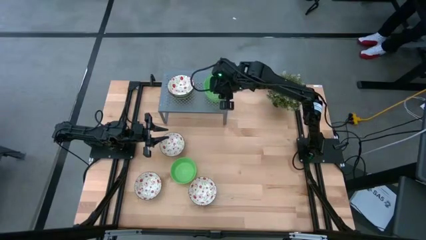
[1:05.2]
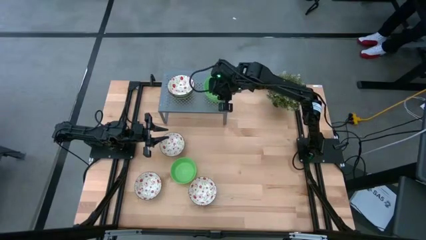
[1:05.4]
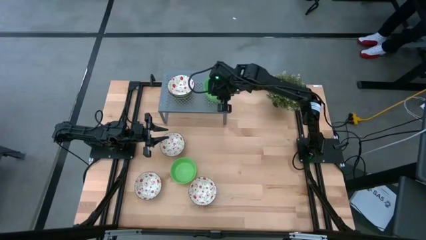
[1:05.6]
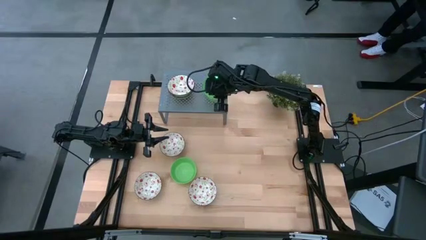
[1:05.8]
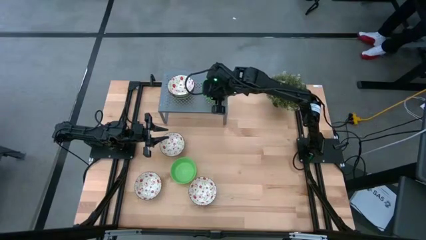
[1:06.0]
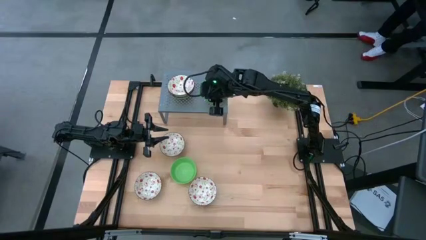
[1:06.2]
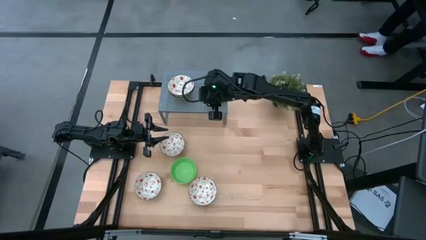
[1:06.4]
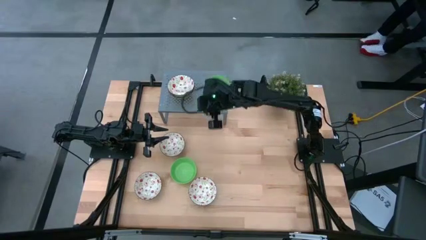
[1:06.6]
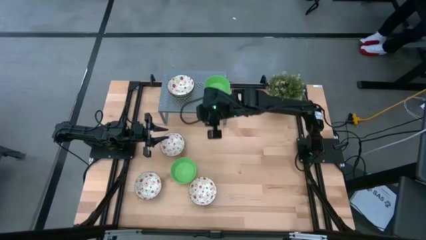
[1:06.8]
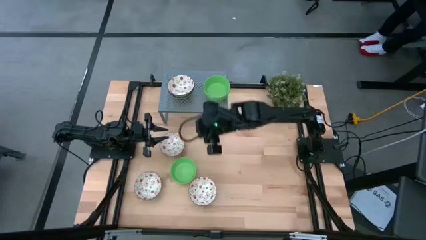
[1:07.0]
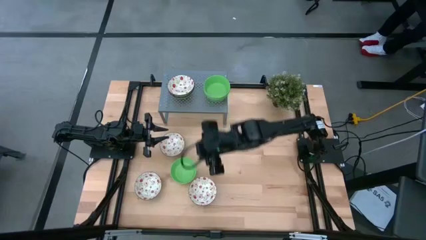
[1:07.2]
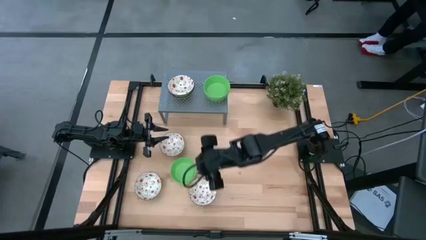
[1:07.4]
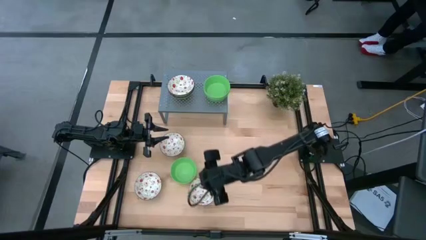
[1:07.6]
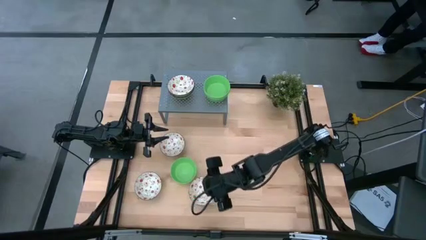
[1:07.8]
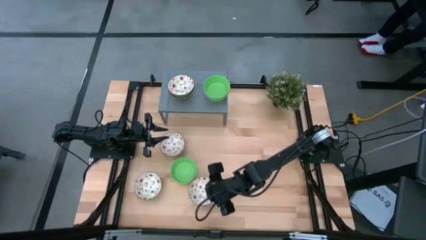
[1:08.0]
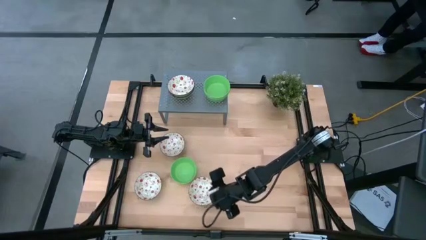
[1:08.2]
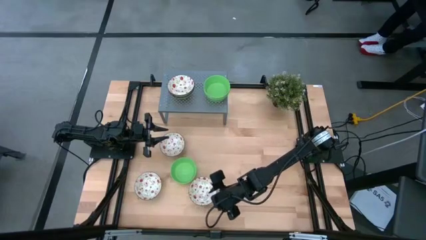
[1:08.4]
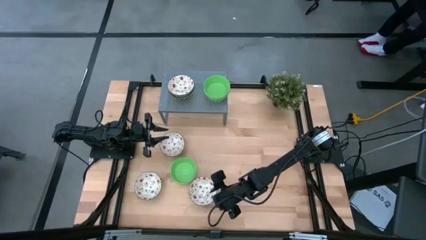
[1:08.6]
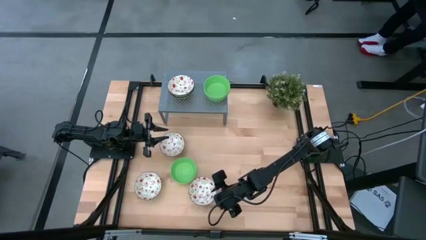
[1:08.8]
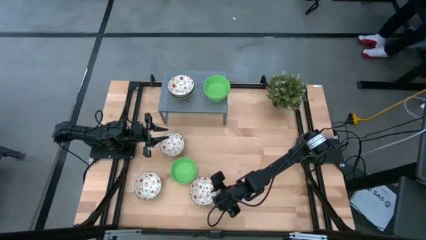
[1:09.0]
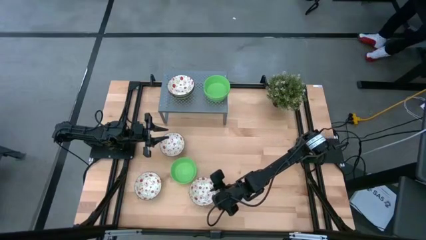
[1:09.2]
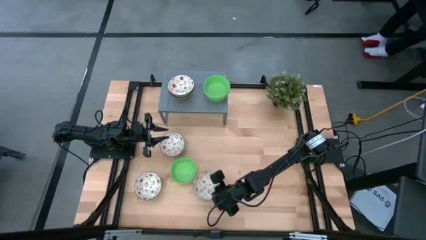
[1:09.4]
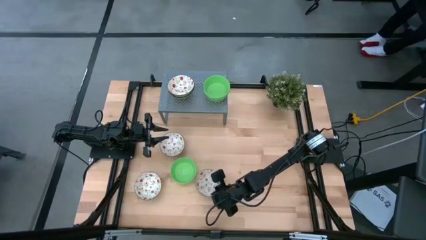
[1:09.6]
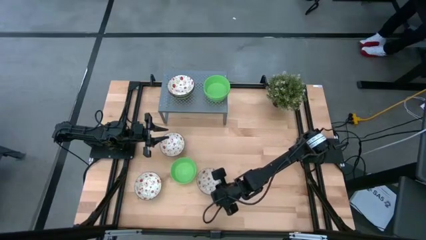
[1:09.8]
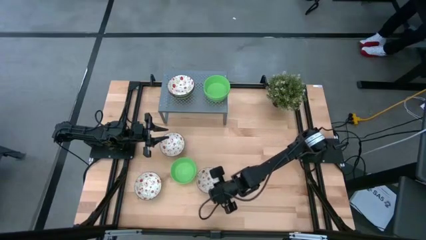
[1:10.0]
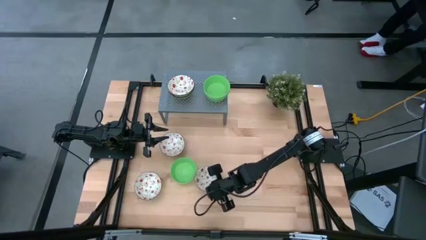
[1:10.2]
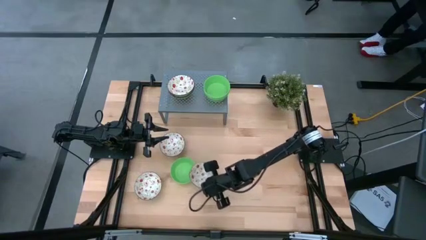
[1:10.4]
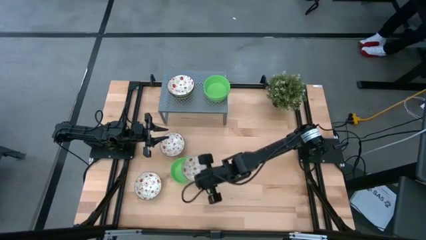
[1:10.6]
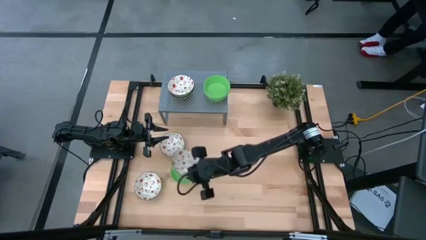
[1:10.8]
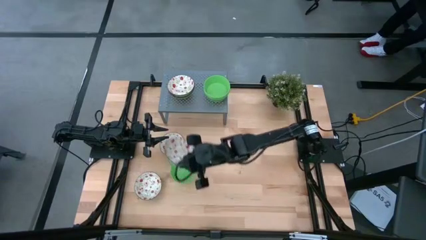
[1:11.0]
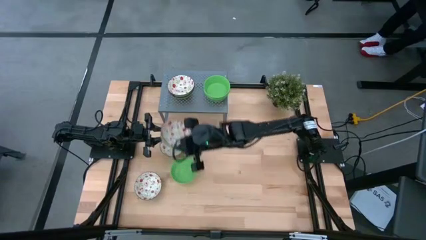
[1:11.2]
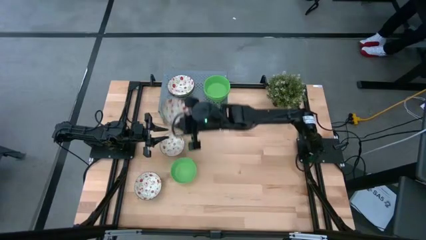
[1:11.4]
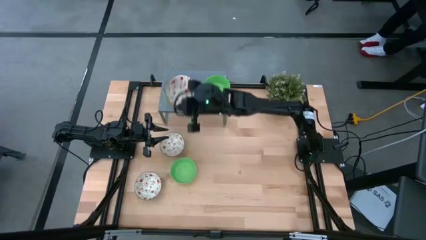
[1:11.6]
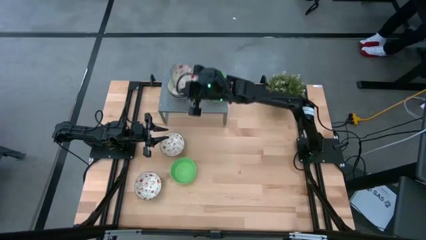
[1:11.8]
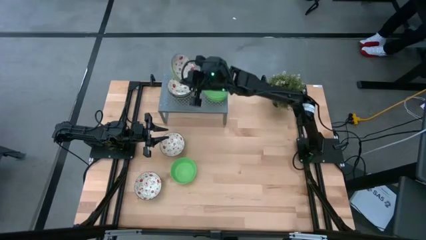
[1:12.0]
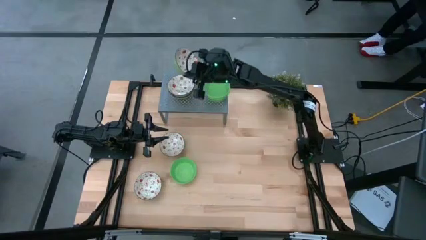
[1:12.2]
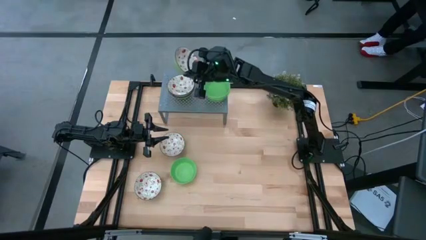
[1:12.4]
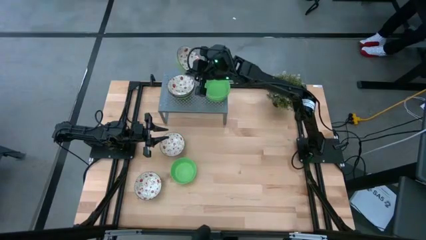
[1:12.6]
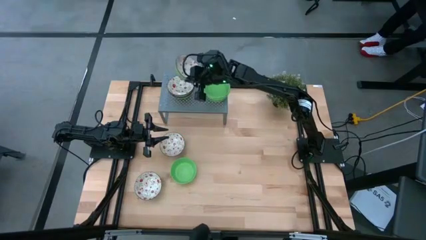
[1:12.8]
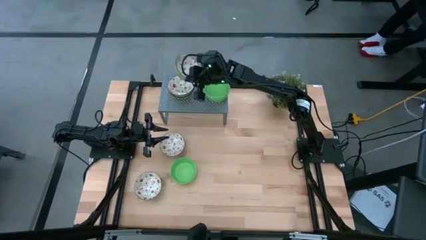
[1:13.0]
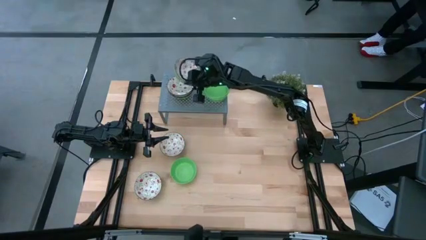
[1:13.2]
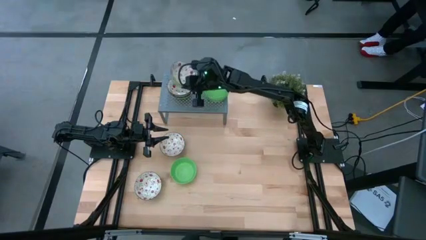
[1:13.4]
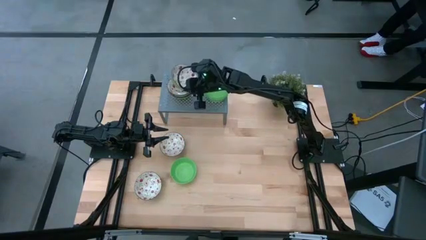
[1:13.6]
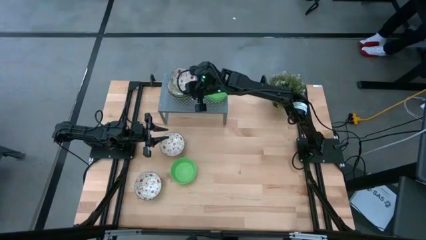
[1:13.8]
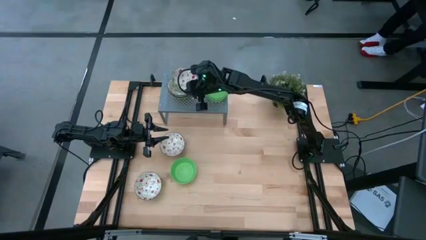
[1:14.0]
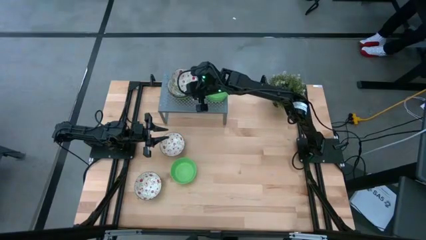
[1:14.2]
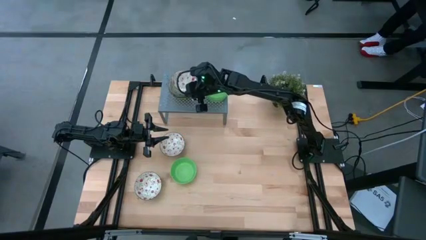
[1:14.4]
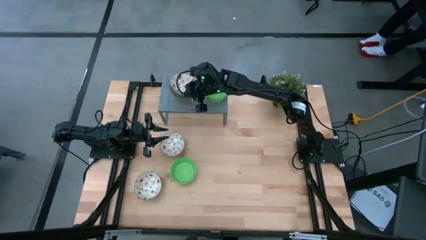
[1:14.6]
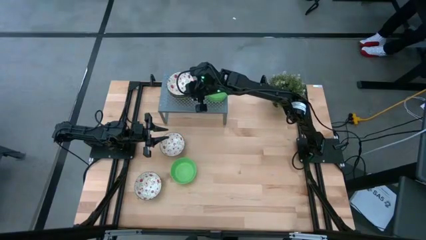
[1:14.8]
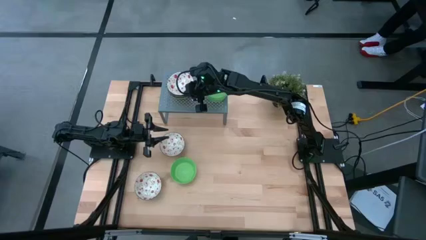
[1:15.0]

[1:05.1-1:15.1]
Task: Pick & Place Mini bowls
Stack the white patterned bowl on the white patterned bowl on the shelf

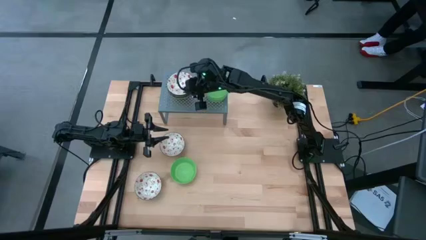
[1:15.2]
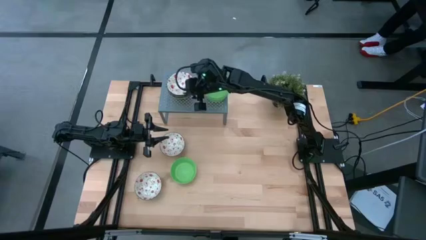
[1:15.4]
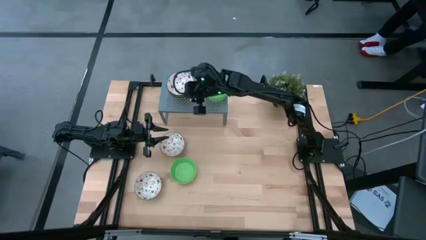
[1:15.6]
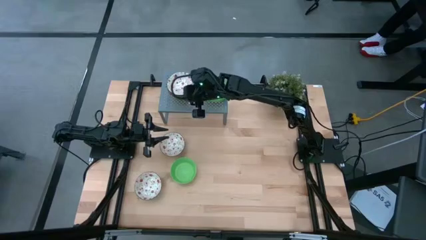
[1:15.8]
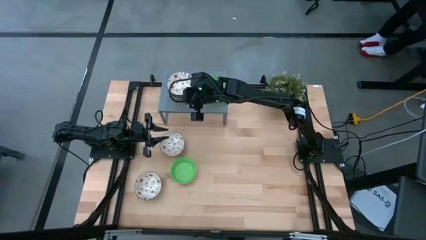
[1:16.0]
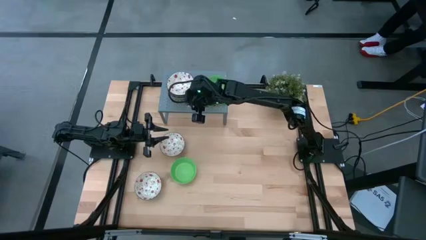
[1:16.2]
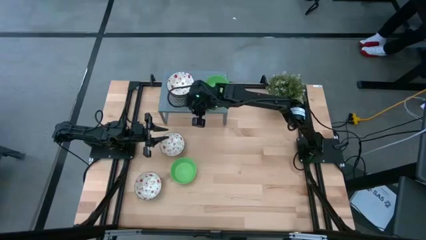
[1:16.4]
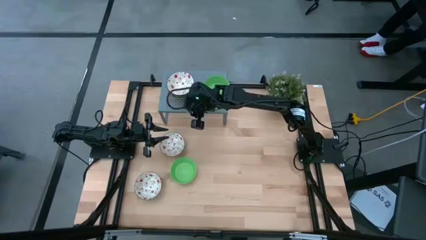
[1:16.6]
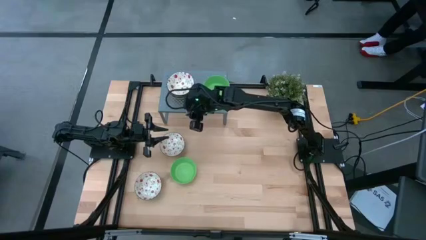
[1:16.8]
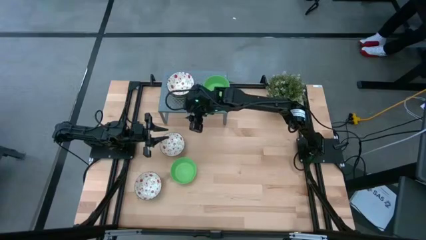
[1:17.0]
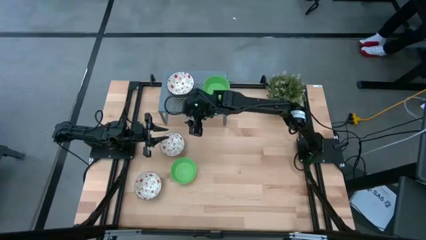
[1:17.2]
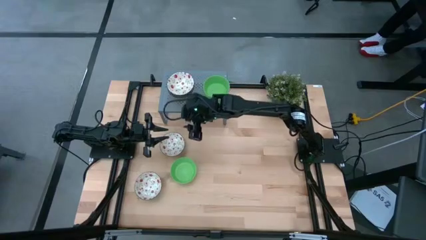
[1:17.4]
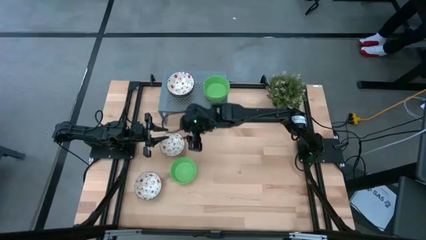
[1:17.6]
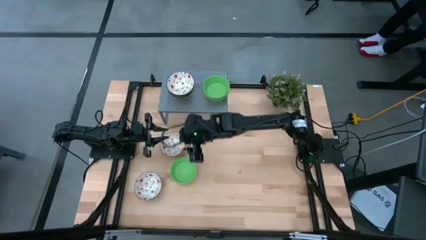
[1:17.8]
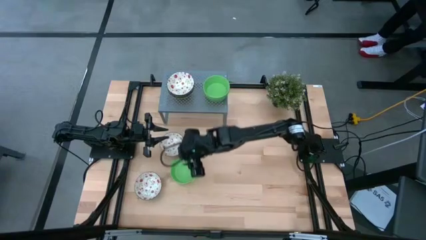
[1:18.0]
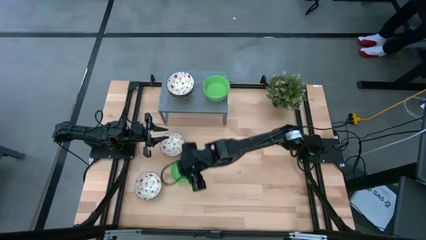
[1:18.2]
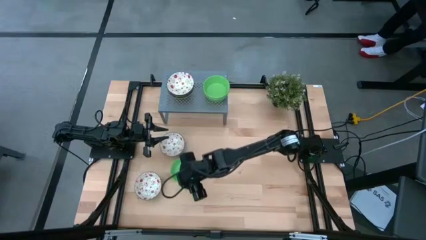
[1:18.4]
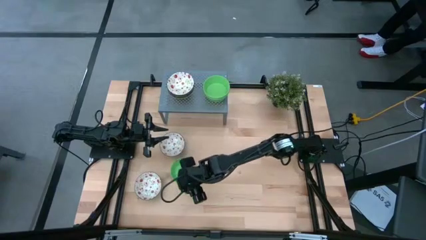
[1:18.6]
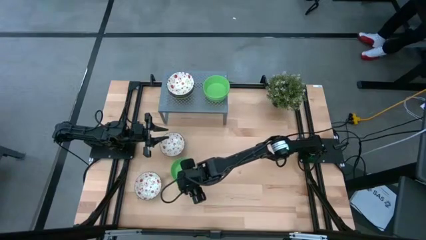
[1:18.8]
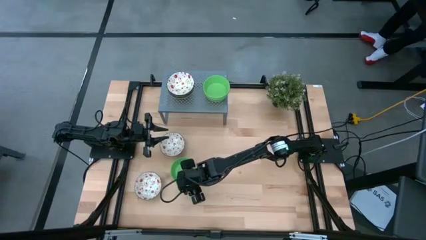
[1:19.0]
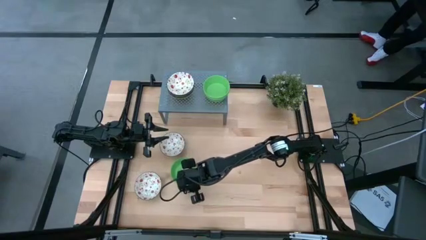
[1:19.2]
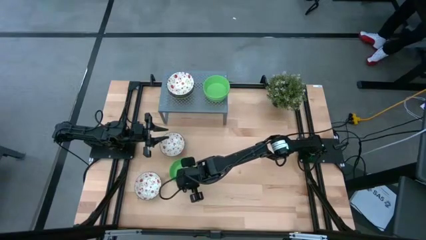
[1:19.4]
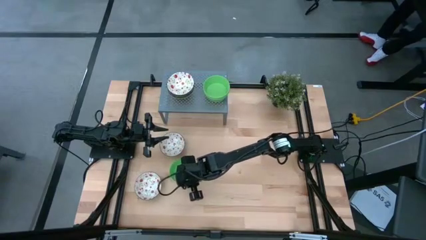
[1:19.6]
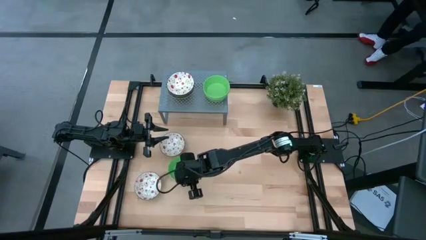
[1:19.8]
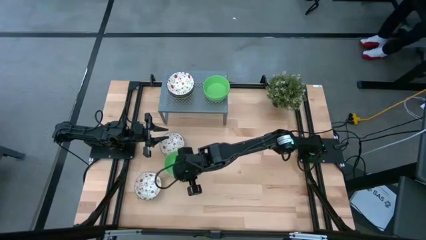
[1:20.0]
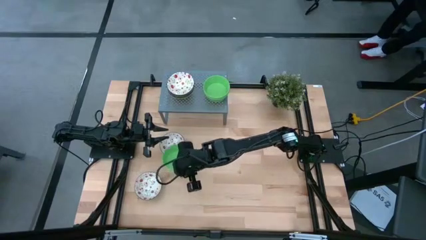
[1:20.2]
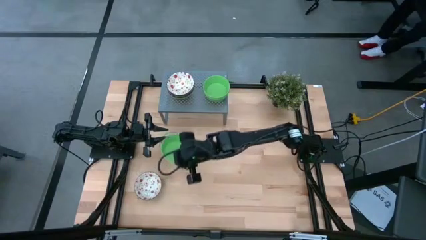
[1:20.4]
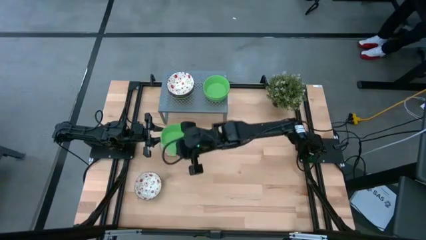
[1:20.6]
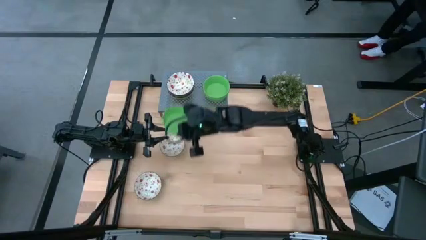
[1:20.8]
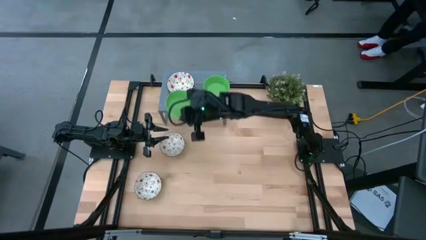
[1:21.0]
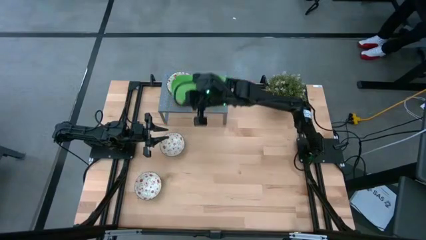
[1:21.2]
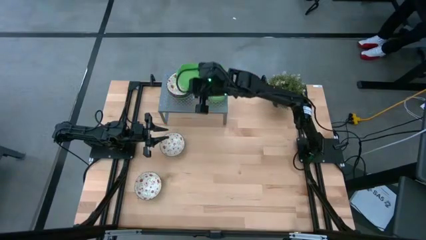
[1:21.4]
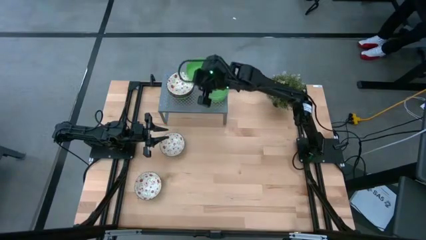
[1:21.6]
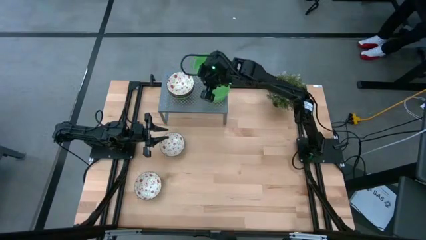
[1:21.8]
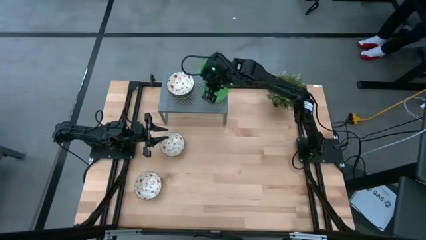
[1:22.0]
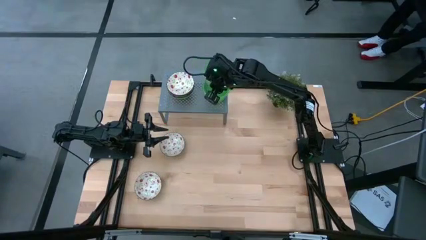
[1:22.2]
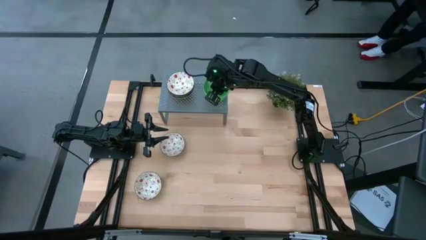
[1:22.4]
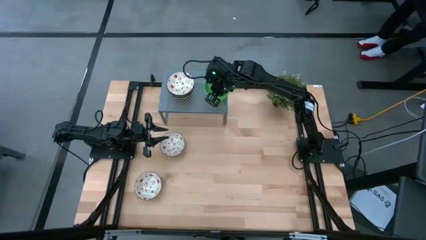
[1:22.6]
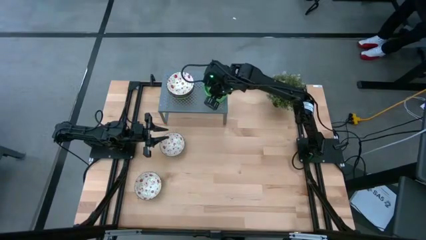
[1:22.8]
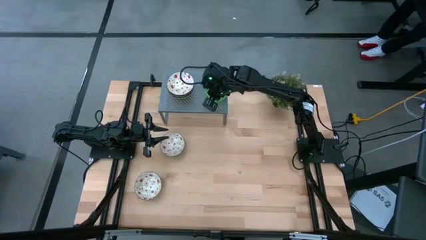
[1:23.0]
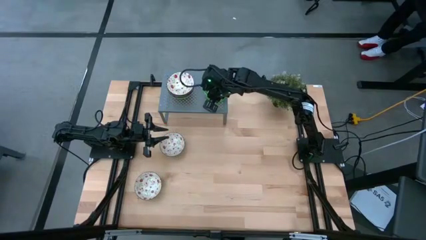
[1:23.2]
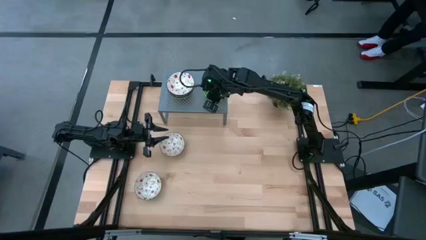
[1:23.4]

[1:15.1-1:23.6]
Stack the green bowl on the green bowl on the shelf
